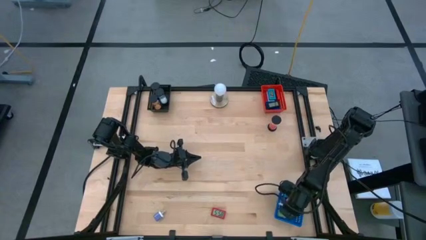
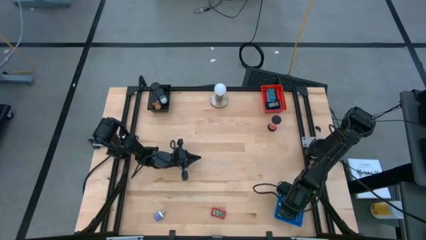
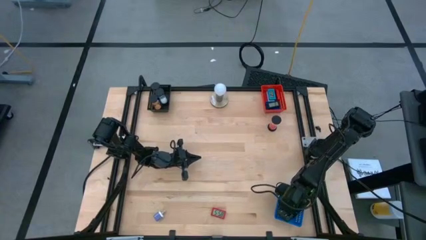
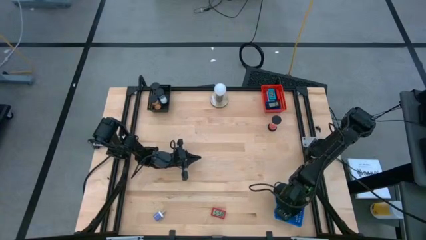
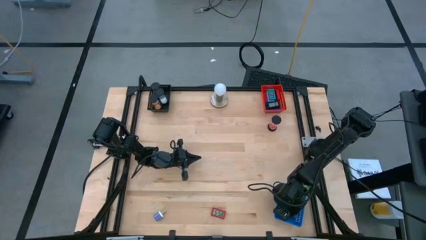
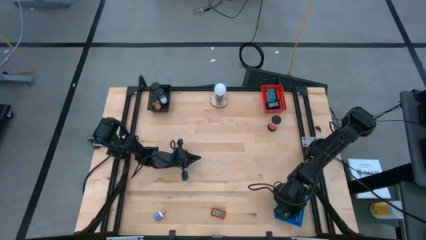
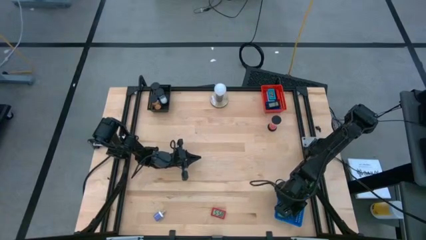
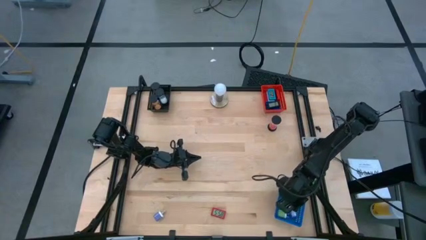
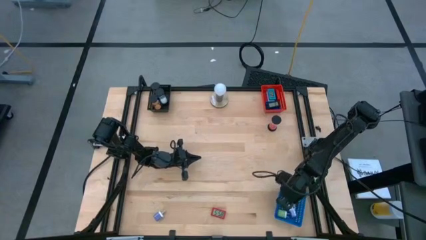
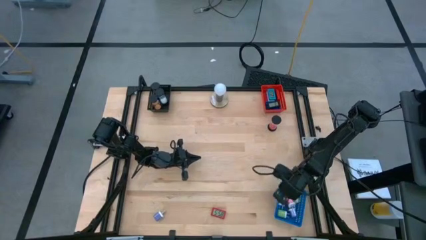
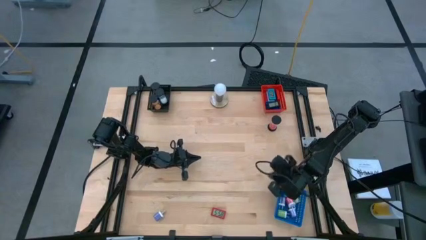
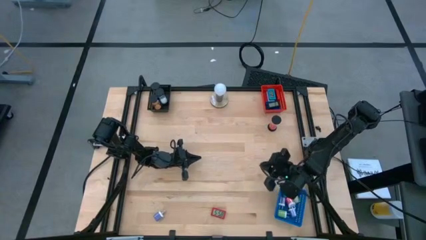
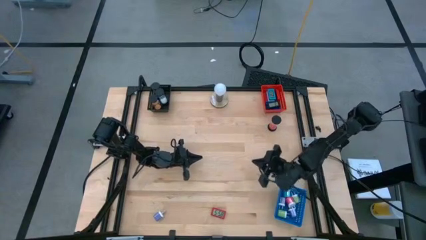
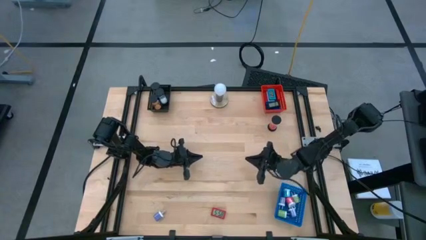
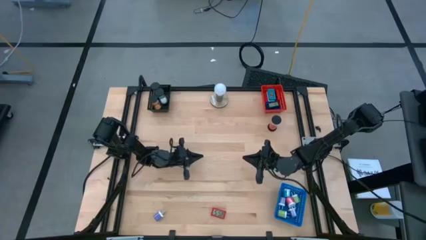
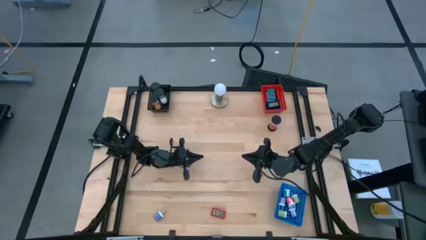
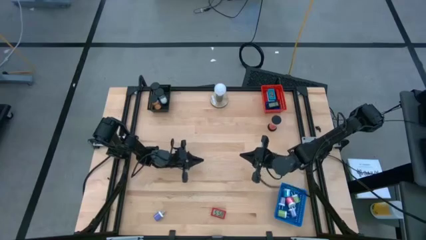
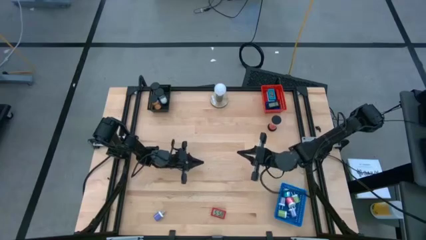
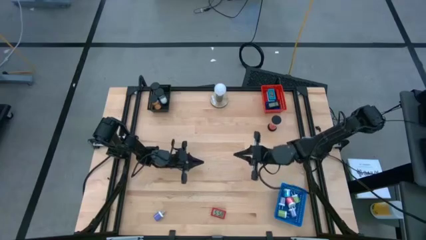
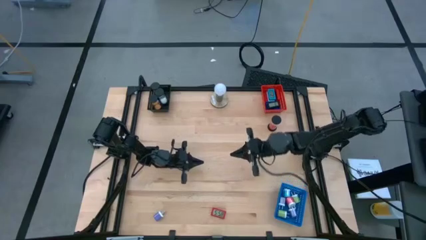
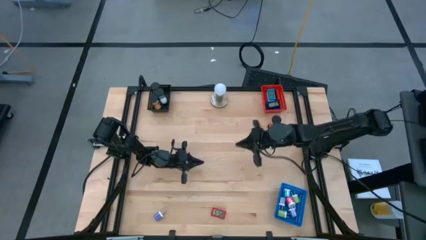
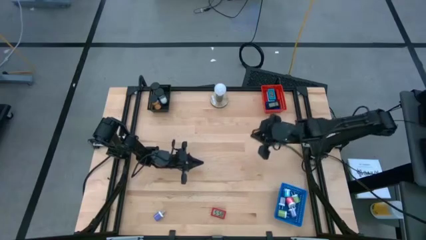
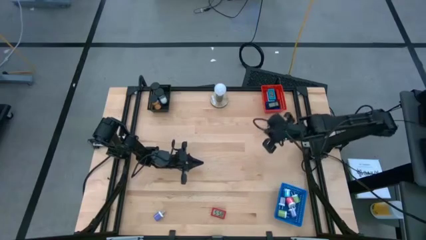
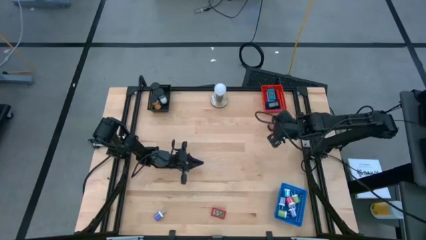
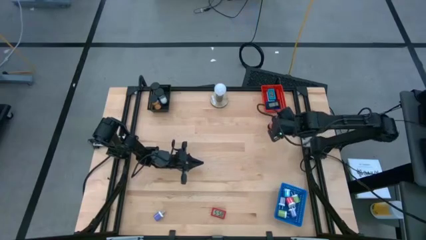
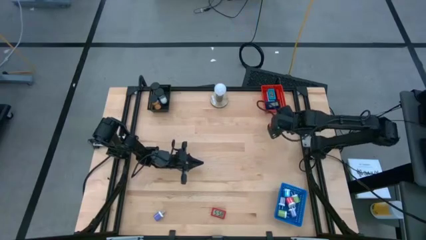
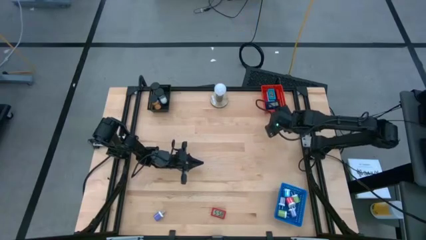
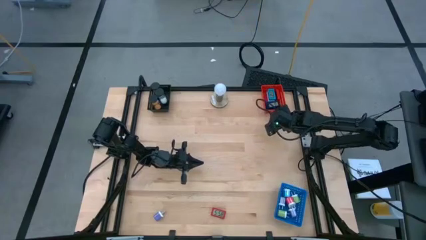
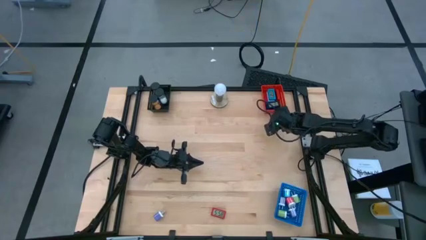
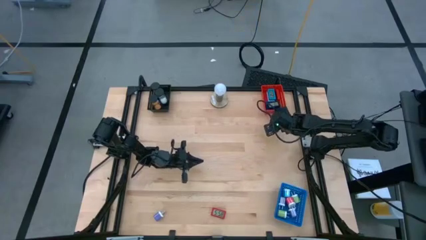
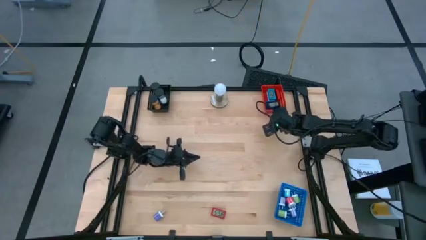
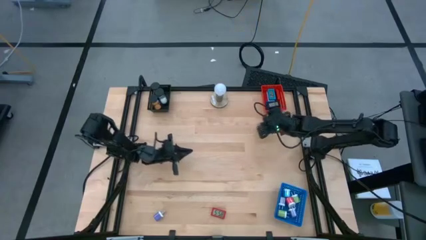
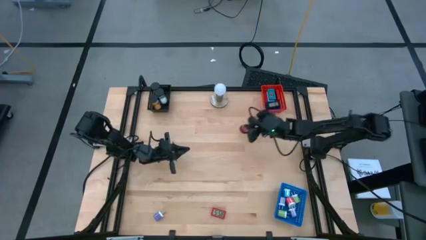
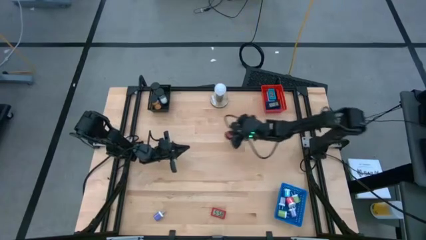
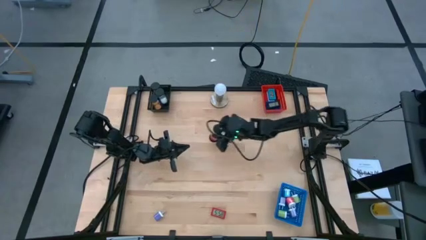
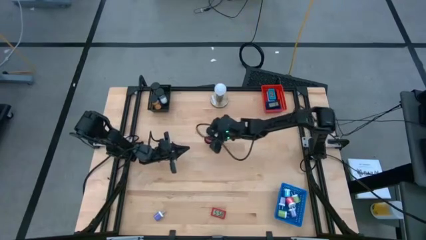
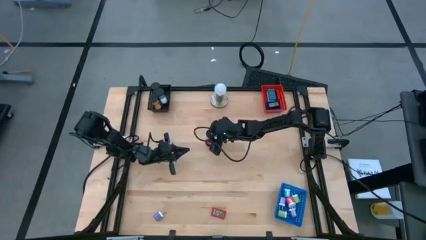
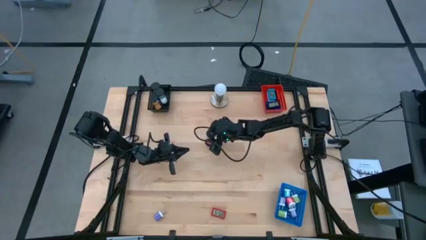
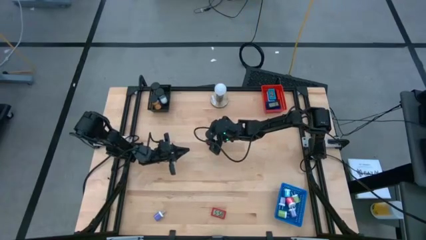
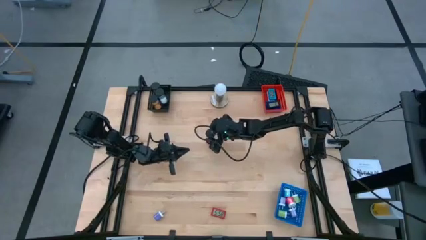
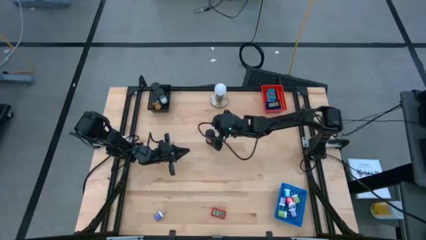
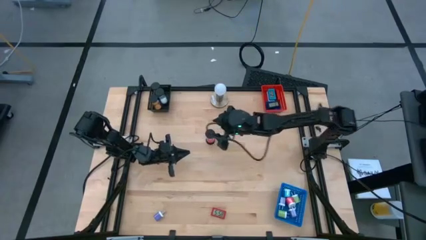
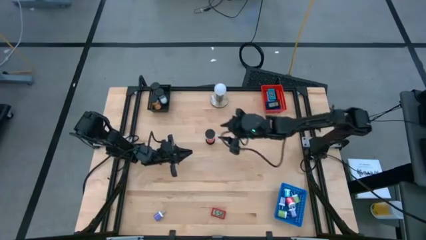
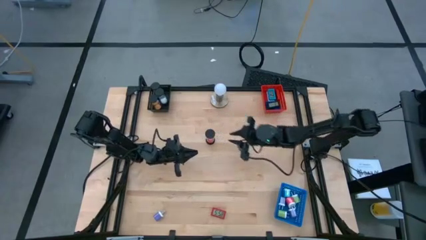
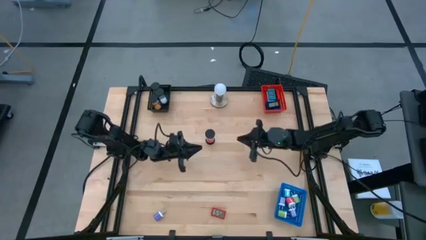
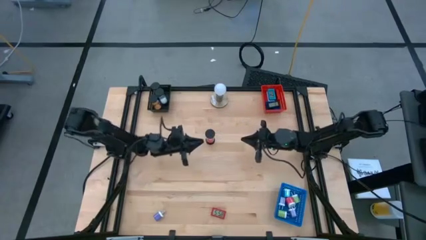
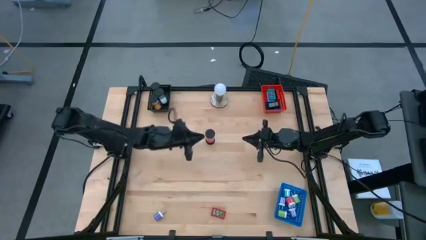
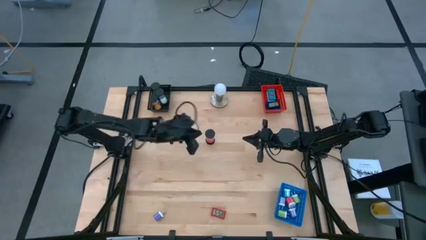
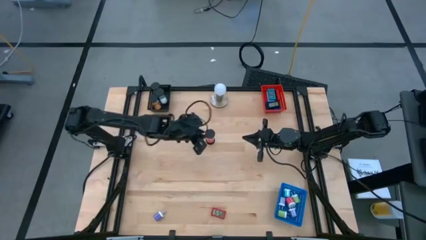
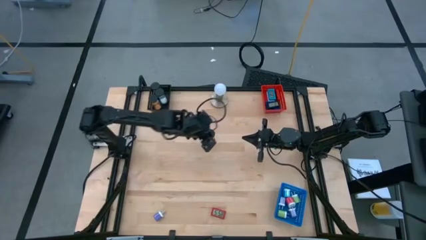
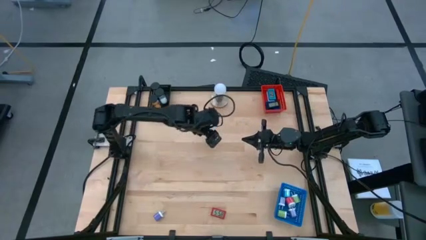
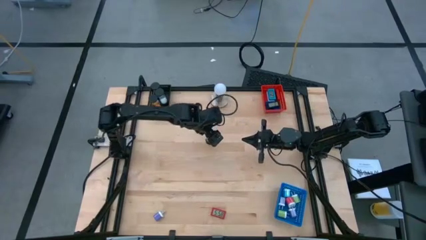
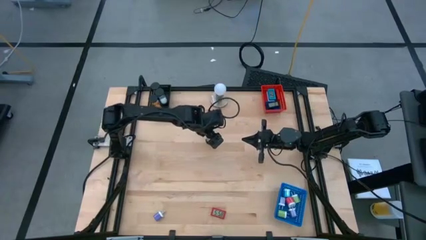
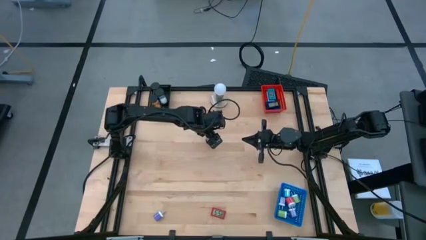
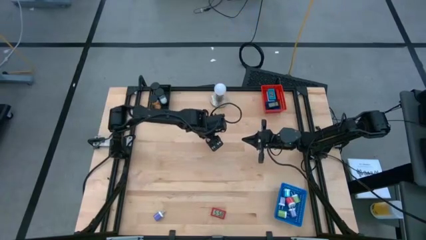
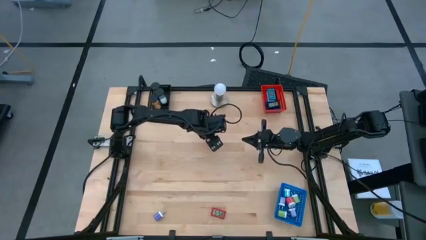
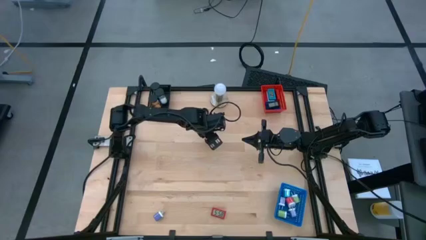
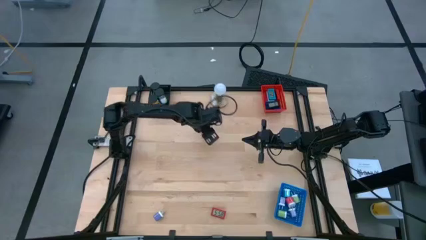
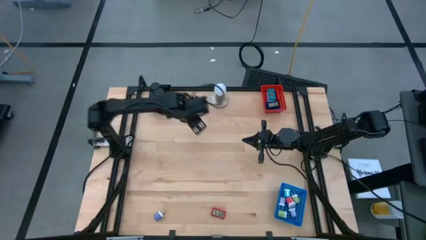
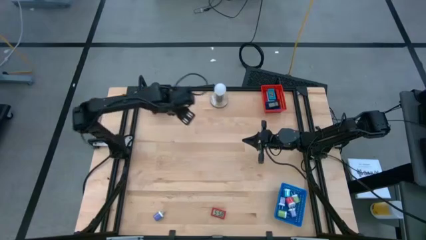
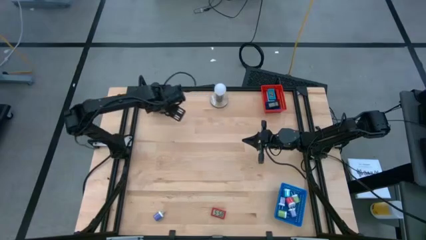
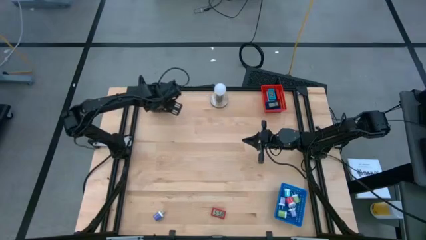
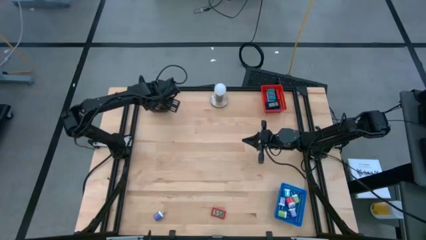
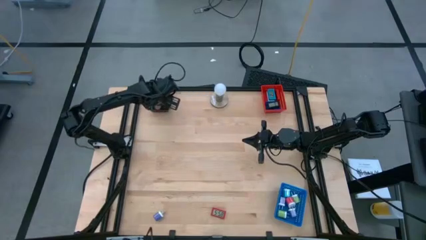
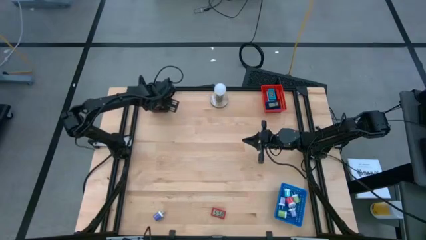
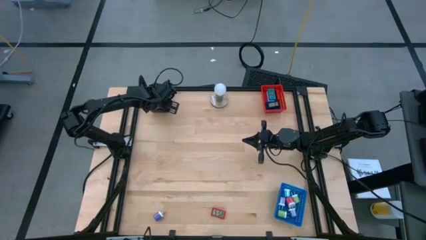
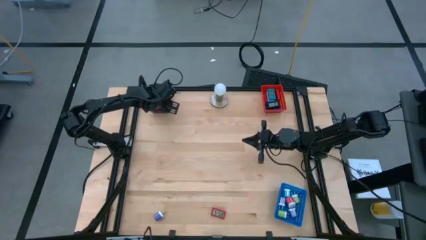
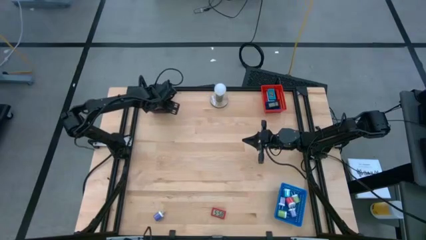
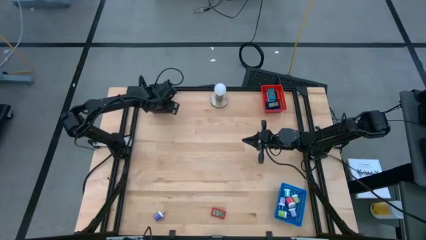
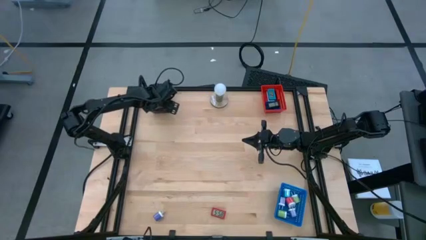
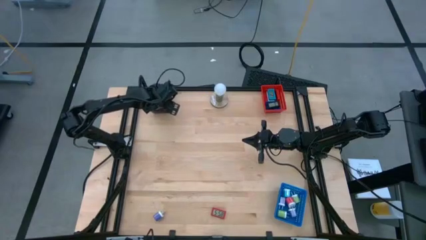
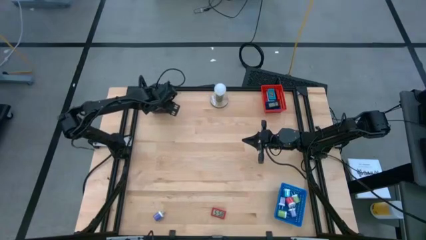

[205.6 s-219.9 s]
Task: Pick & Place Office items
Put the pink hourglass into the black bin
